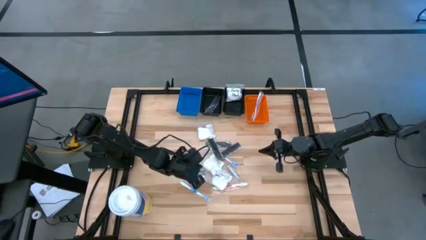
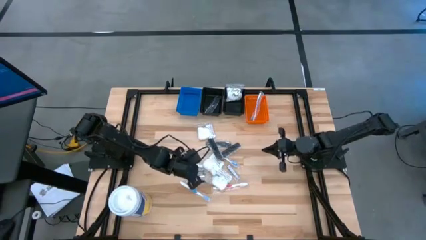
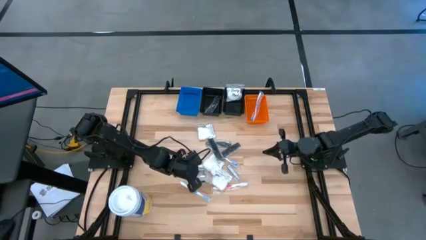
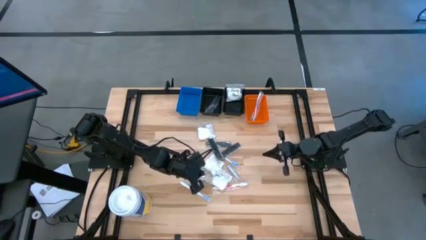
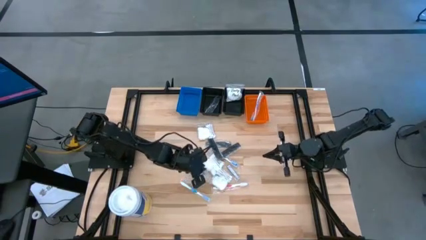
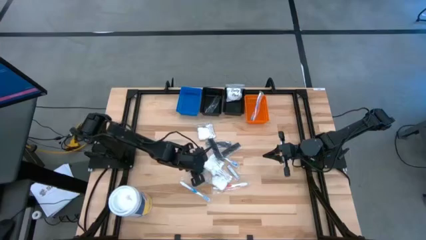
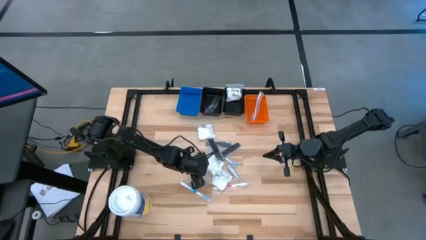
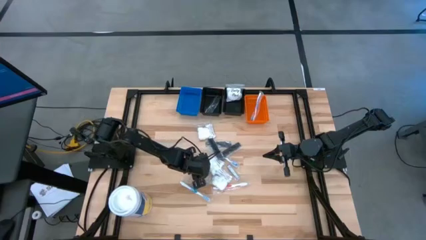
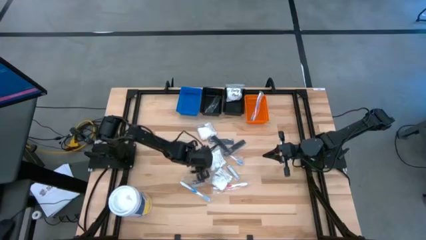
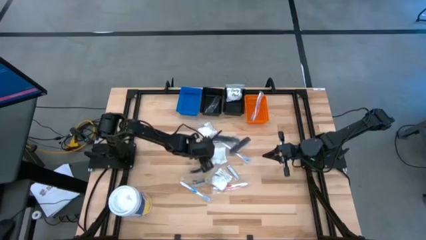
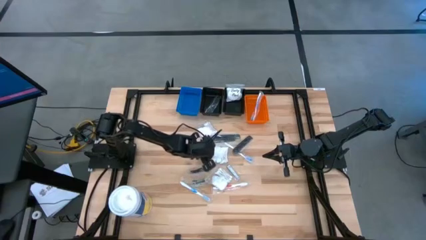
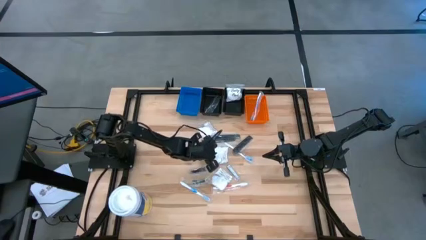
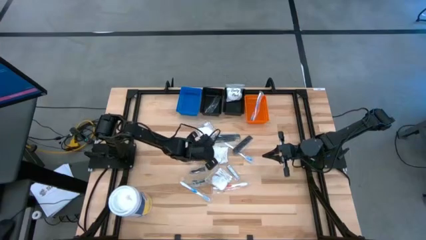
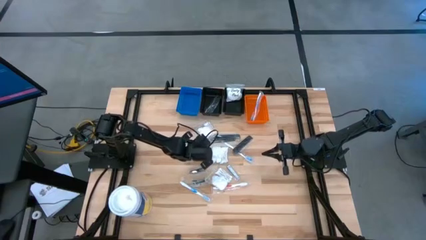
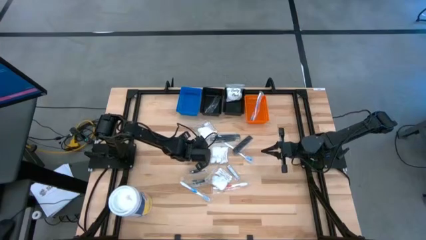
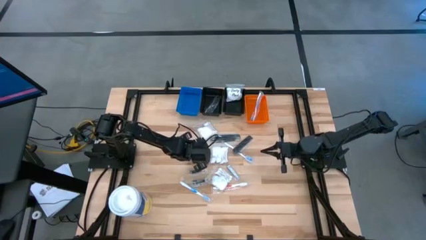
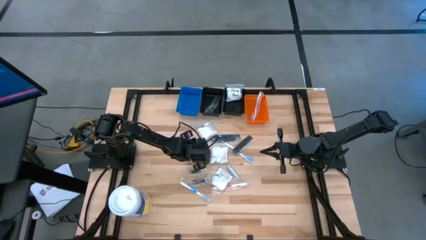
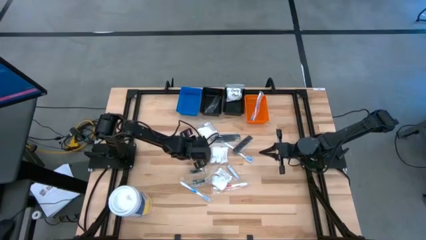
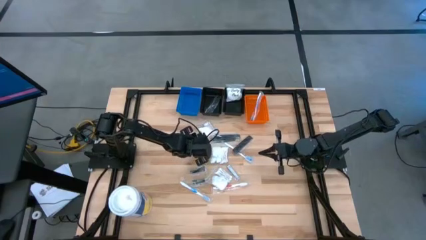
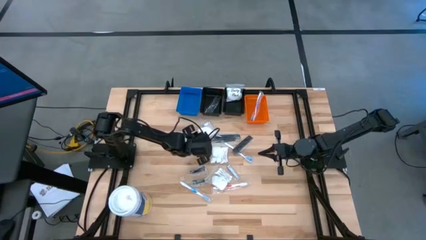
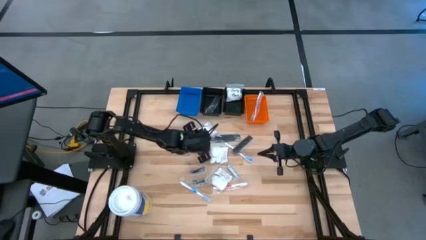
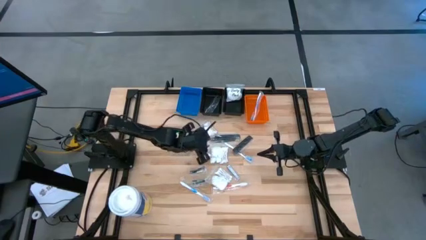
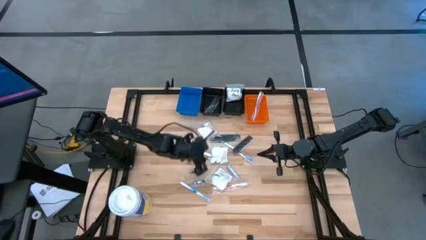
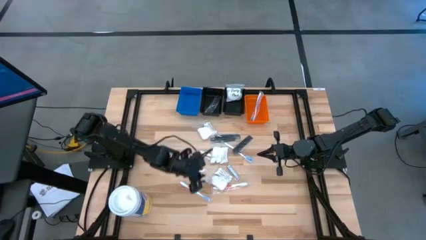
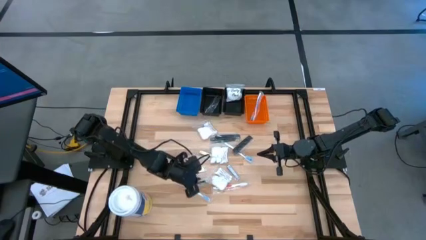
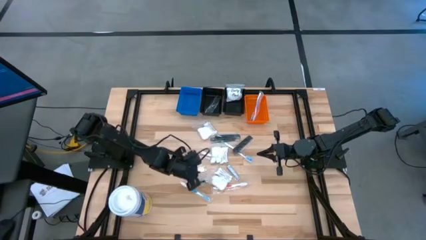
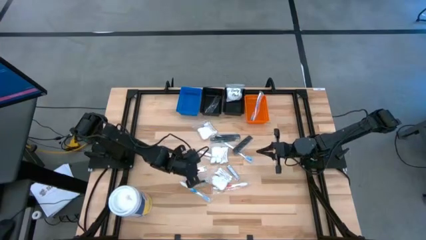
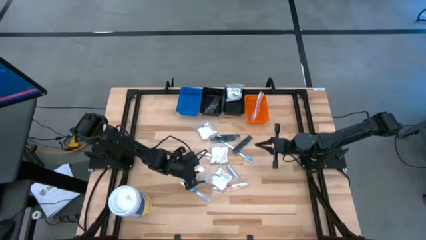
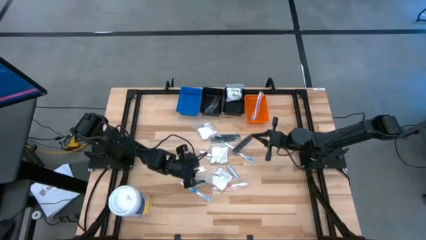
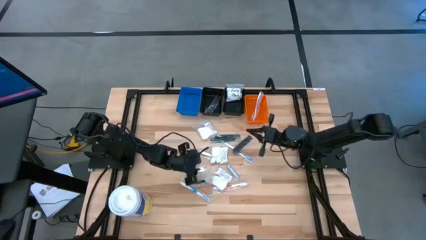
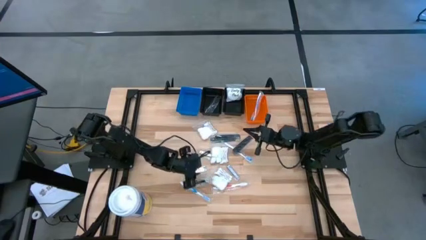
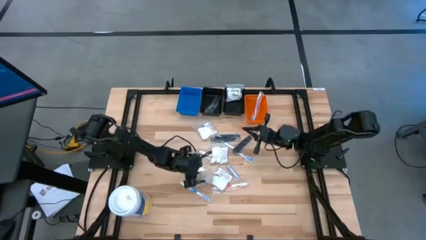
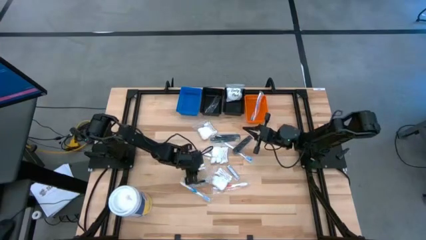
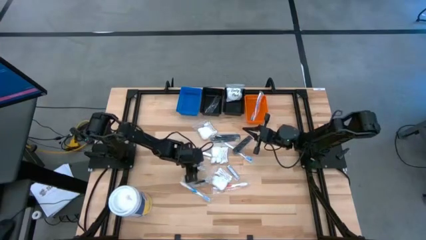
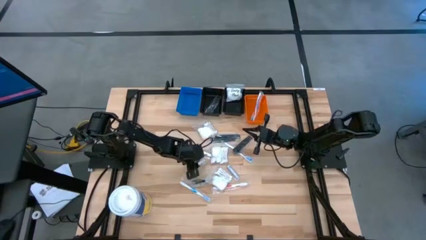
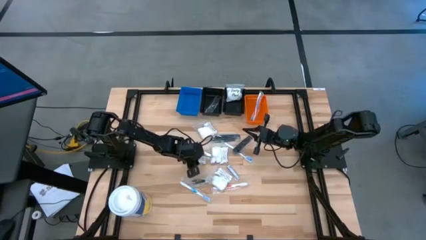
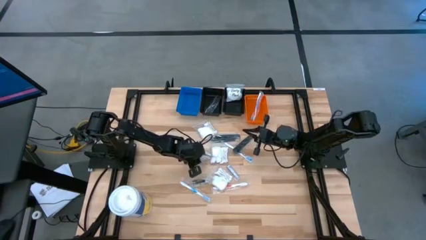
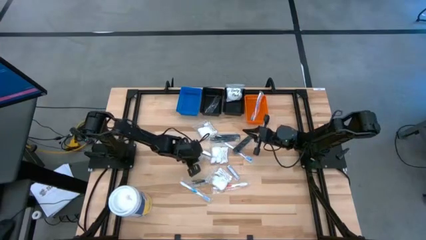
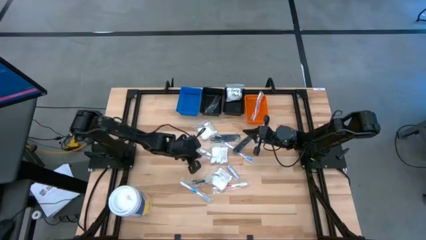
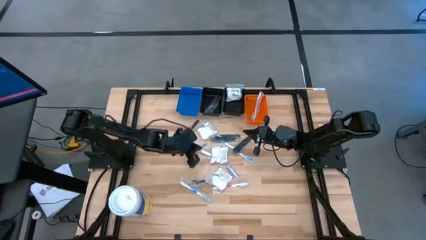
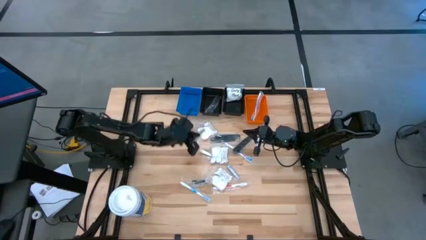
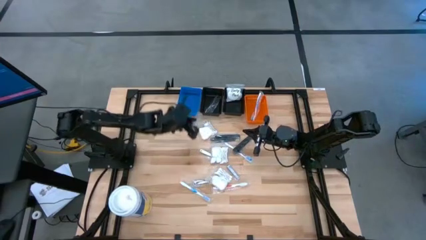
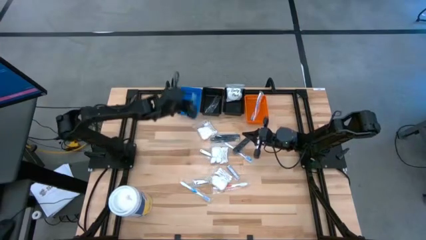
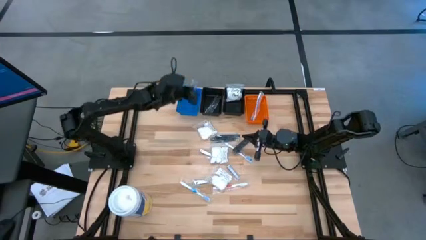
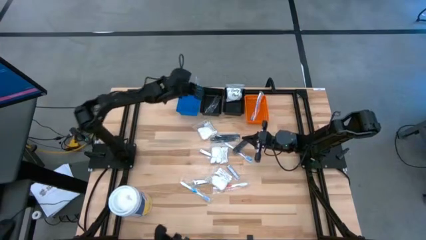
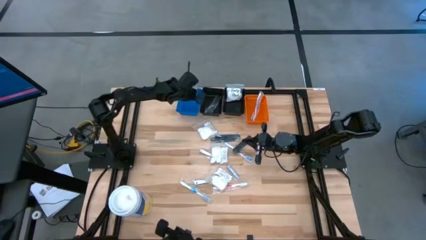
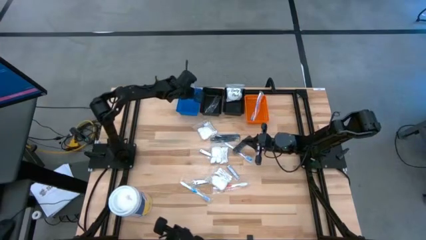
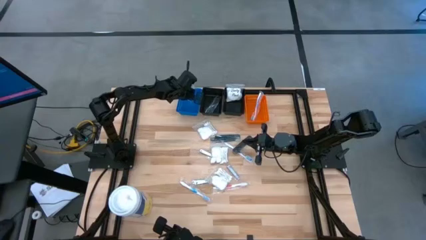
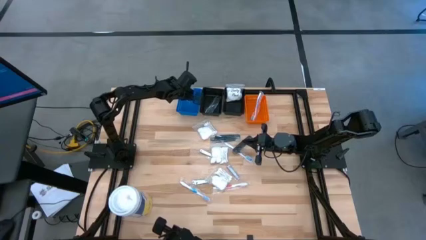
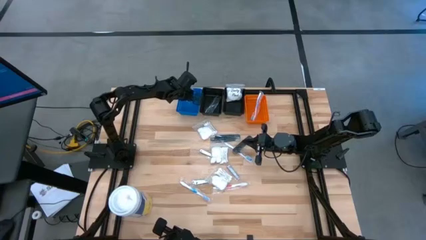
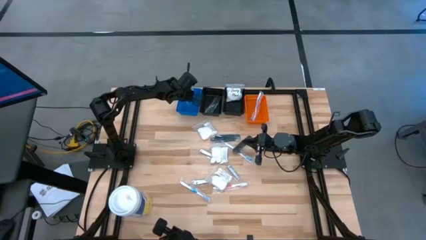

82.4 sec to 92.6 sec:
Task: Pick & Place Travel size toiletries
Put the silver nail cutter into the blue bin

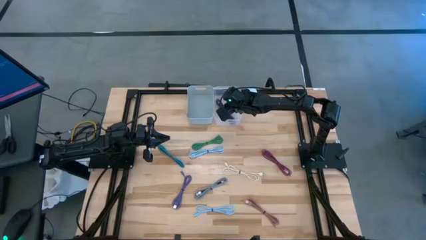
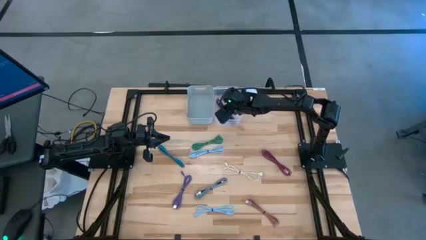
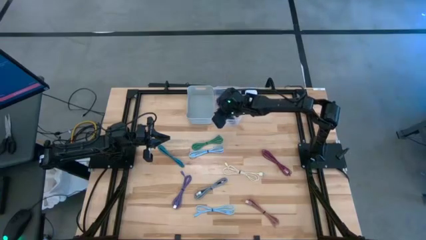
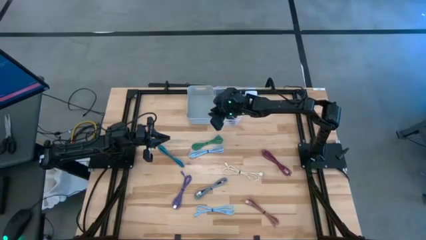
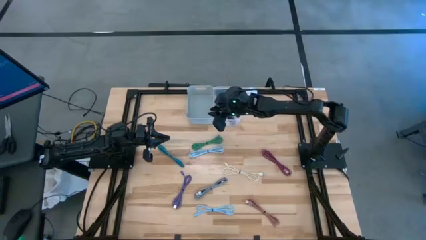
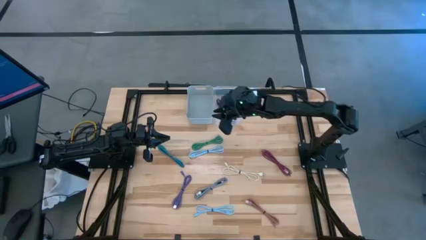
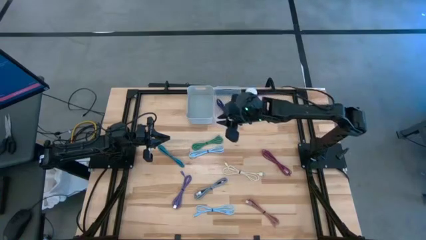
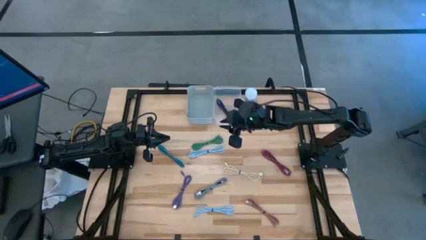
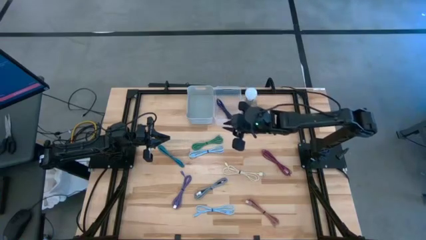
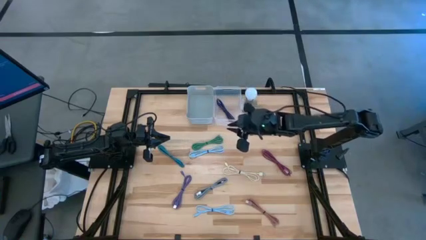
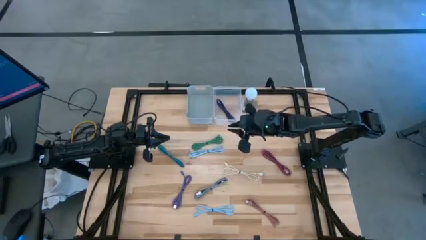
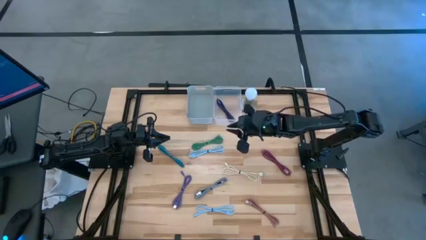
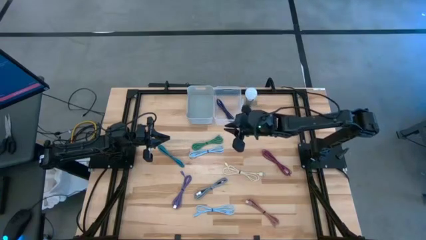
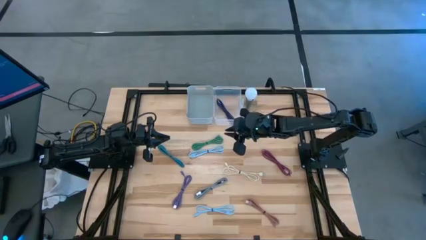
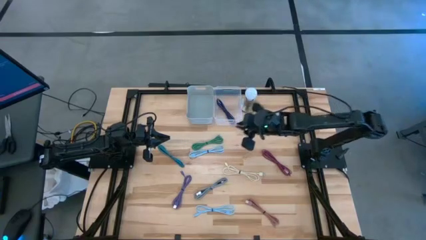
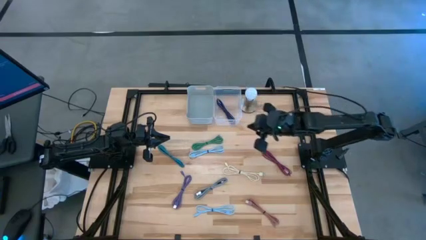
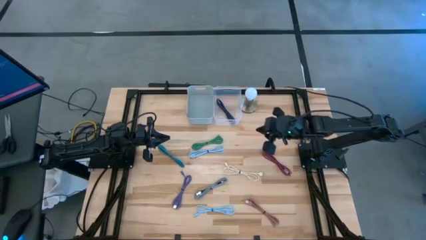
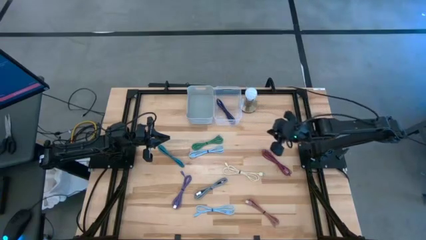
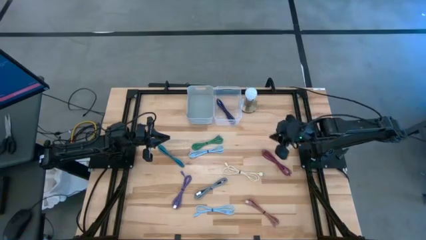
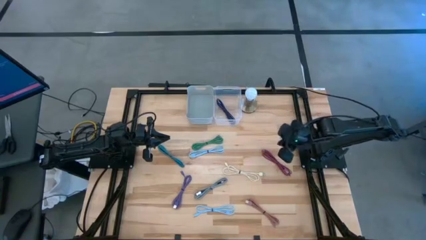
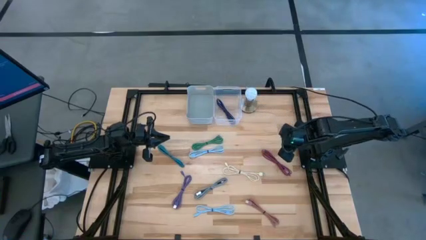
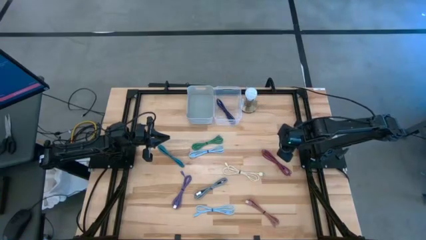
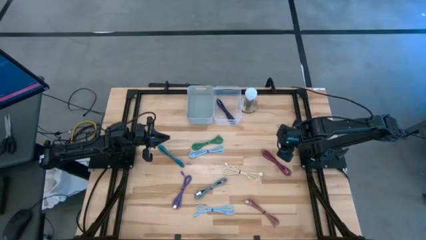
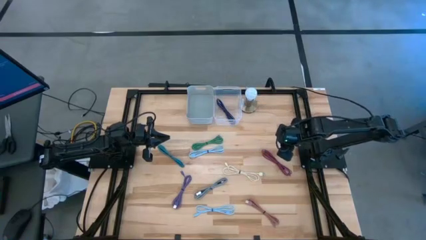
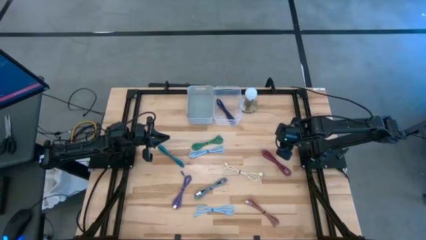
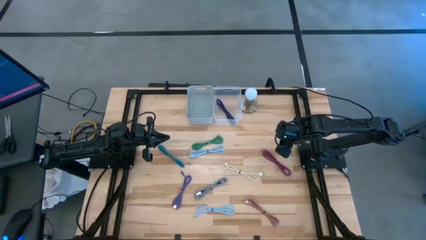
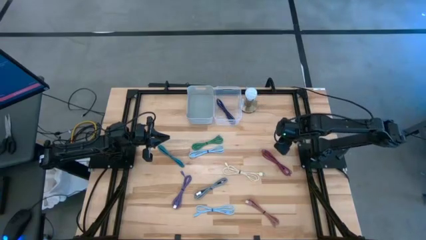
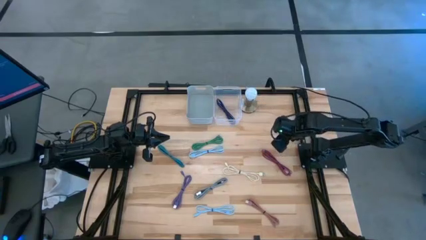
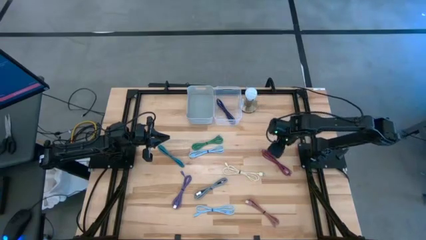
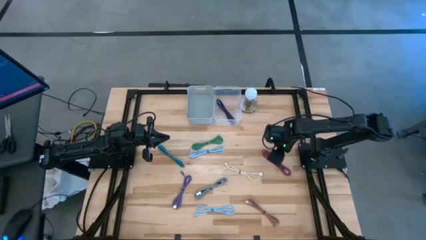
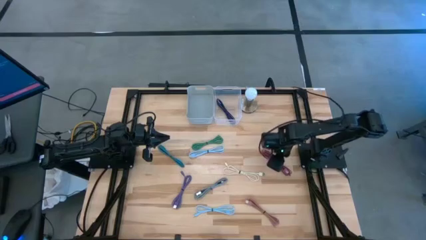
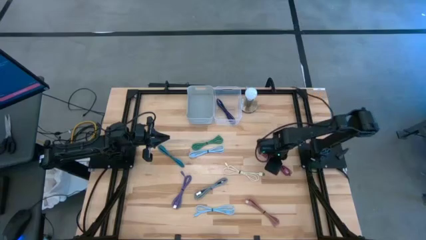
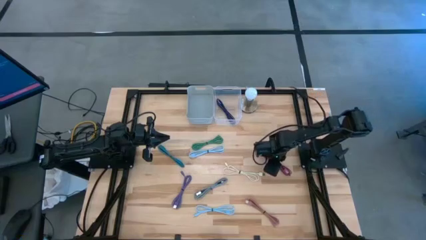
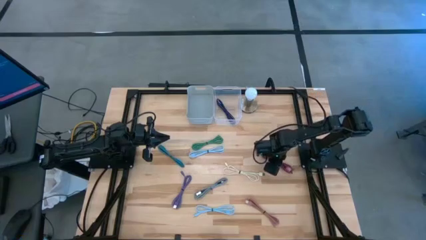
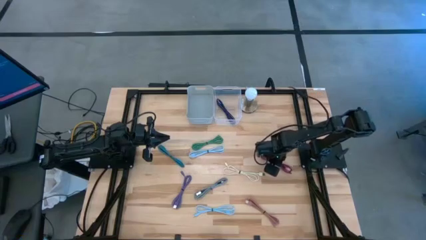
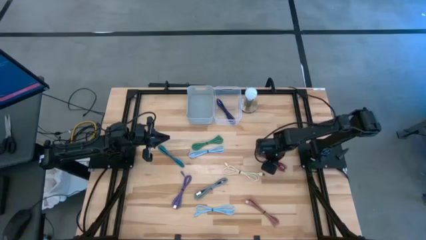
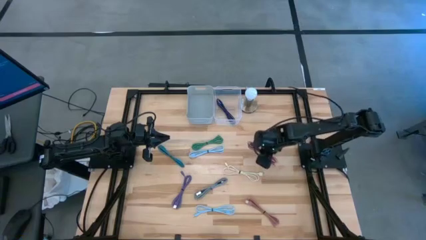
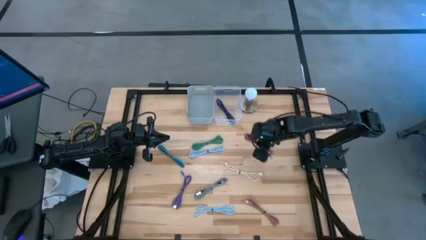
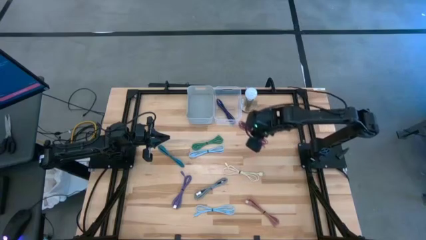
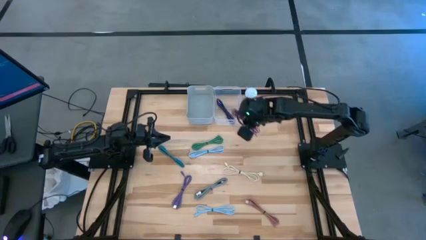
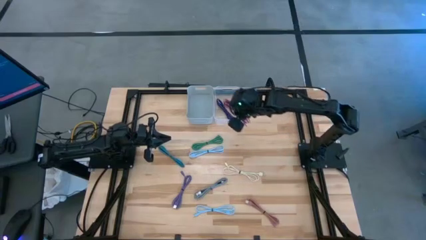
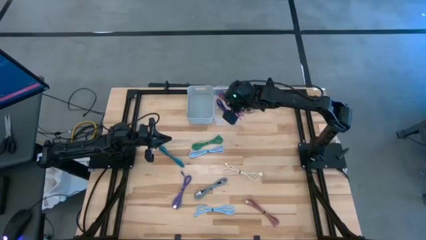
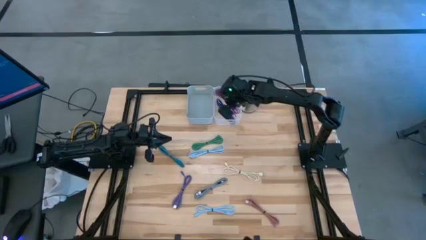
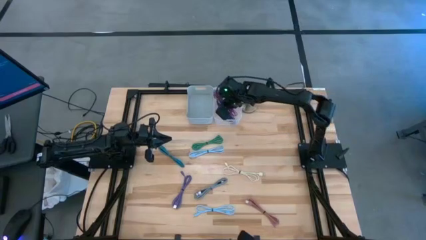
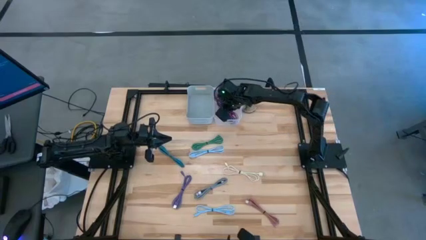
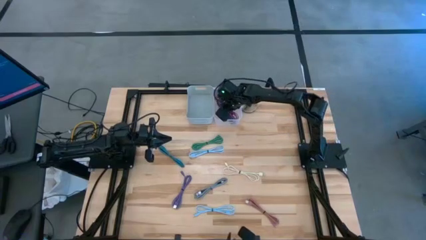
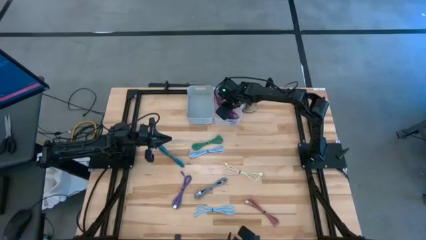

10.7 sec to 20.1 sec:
Task: Pick & Place USB Port
Put the braided pink charger cable into the transparent bin
